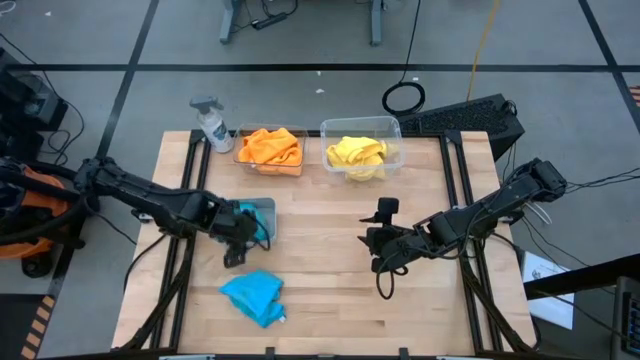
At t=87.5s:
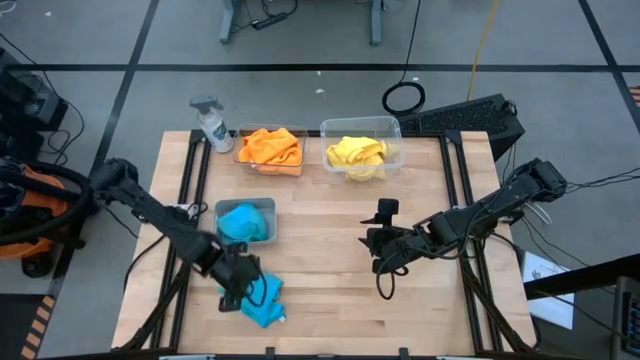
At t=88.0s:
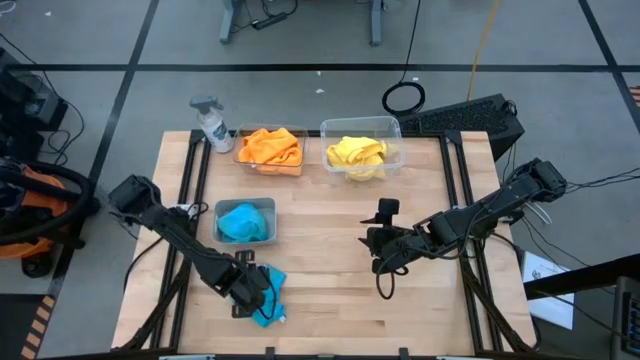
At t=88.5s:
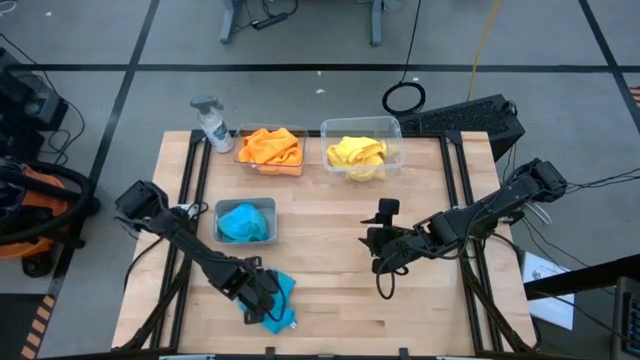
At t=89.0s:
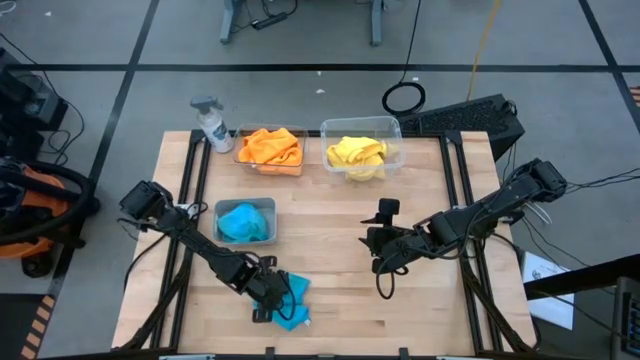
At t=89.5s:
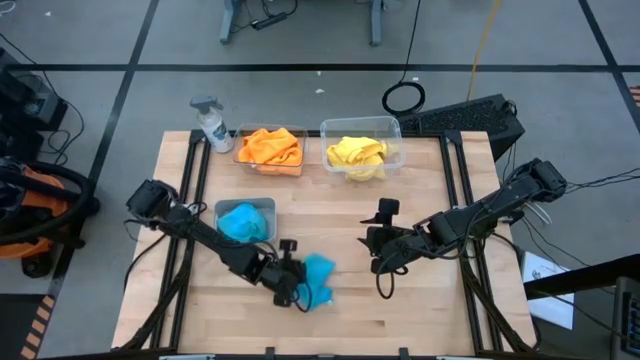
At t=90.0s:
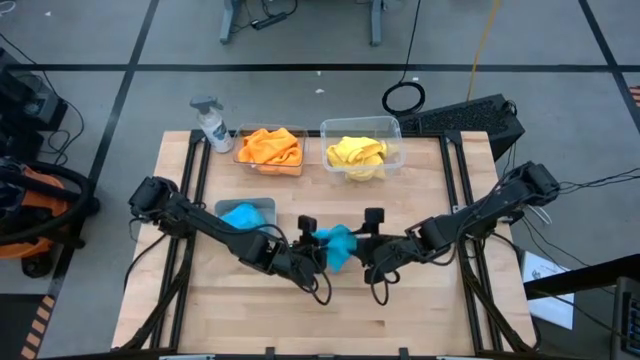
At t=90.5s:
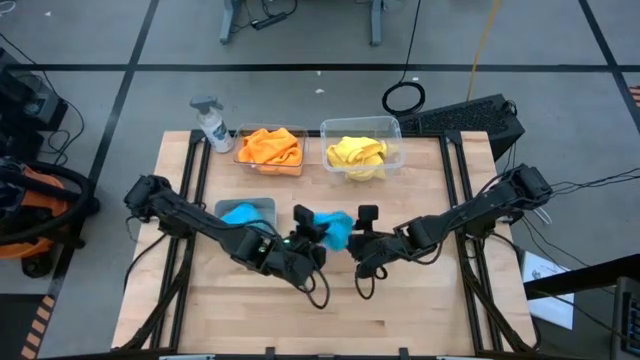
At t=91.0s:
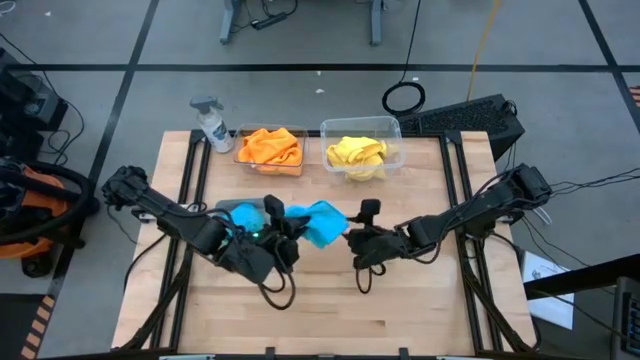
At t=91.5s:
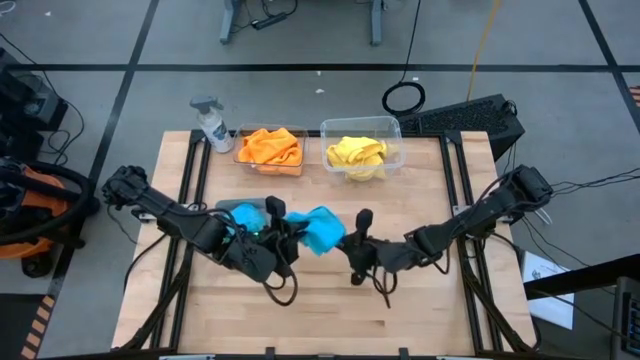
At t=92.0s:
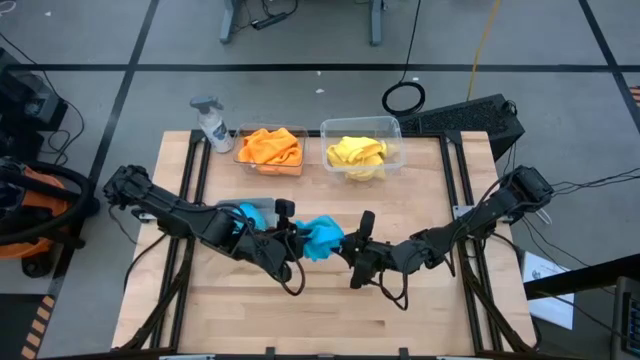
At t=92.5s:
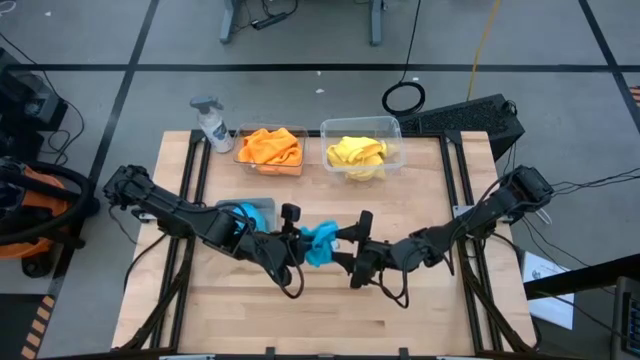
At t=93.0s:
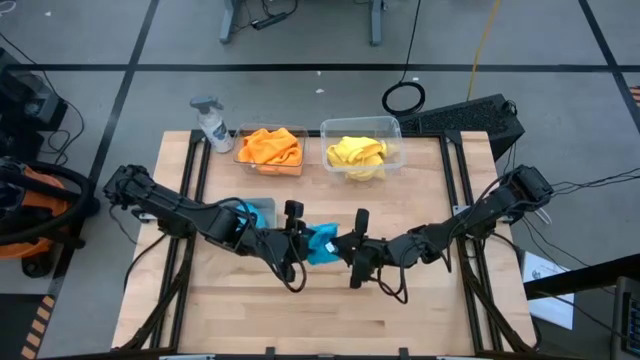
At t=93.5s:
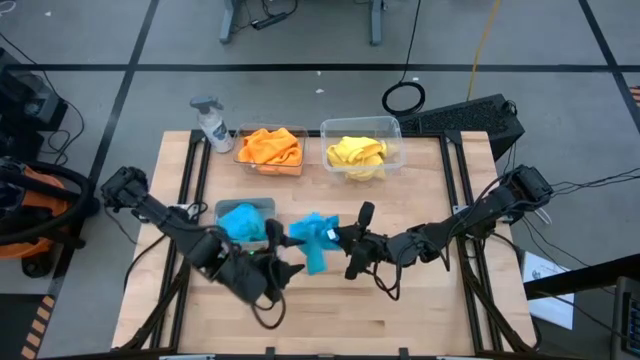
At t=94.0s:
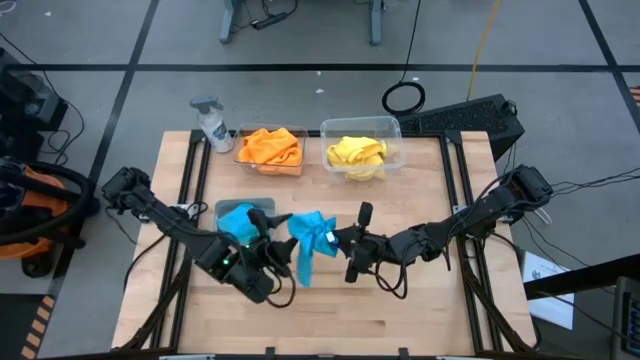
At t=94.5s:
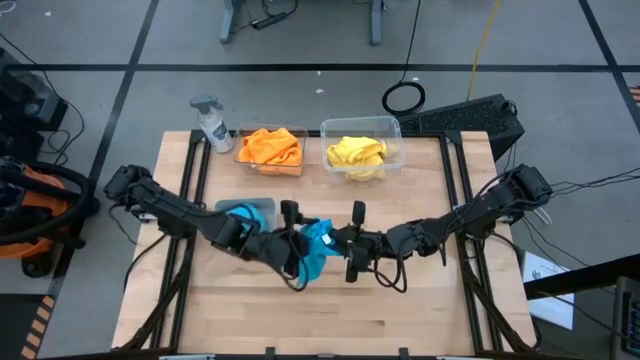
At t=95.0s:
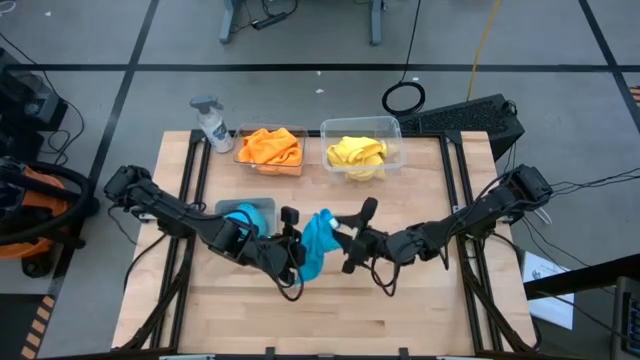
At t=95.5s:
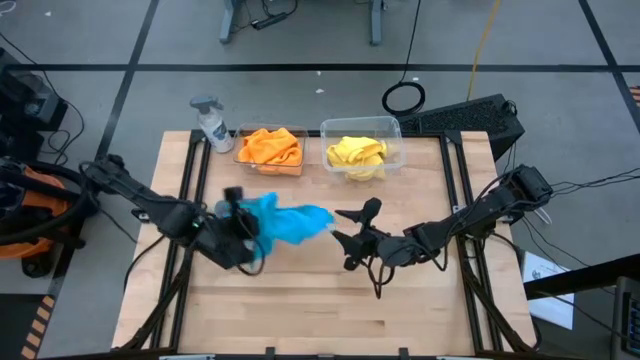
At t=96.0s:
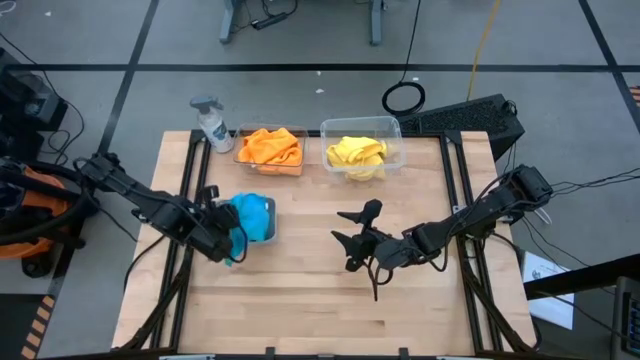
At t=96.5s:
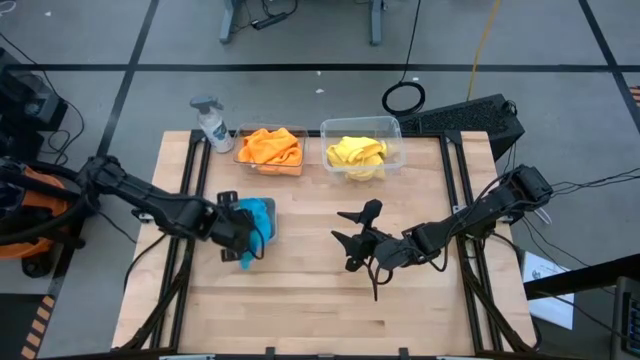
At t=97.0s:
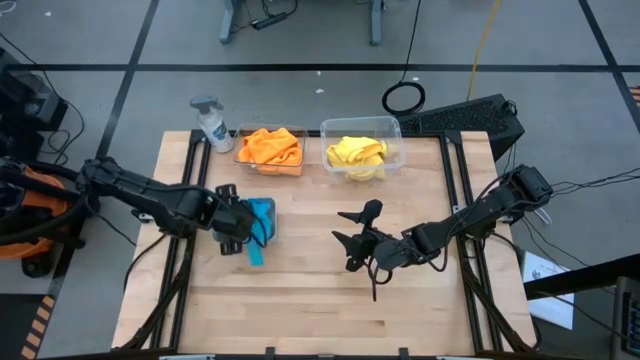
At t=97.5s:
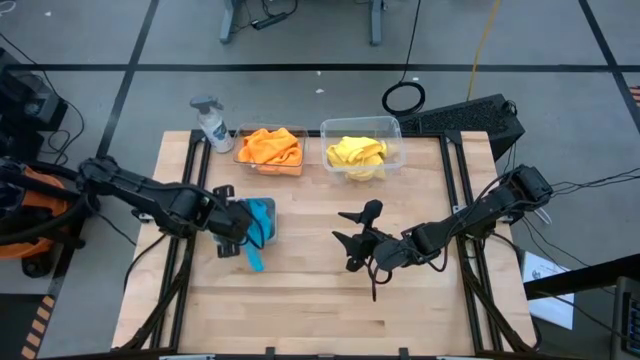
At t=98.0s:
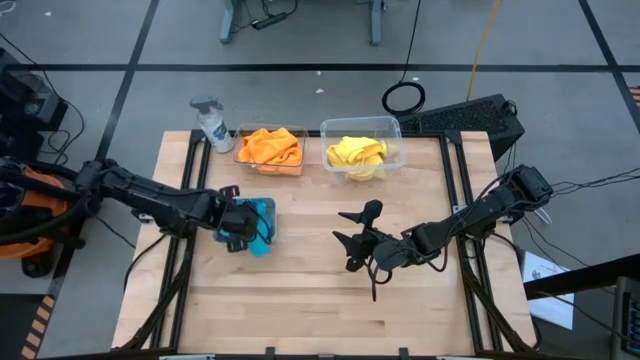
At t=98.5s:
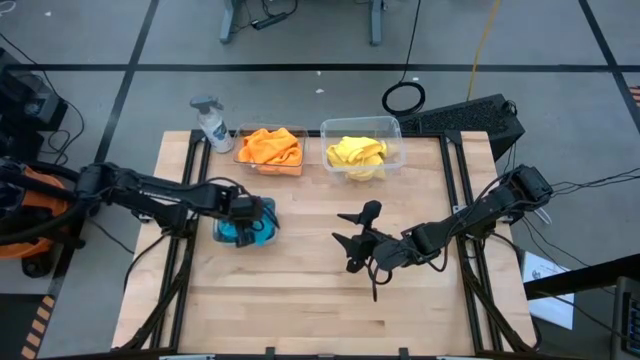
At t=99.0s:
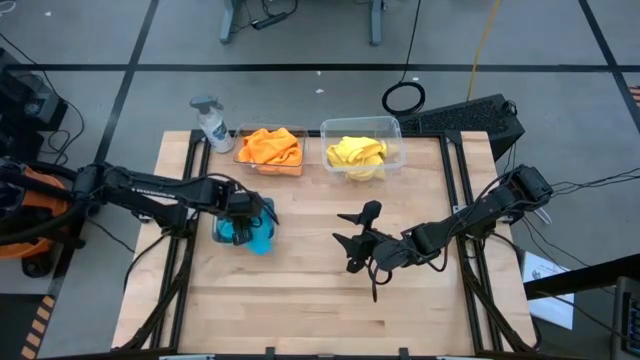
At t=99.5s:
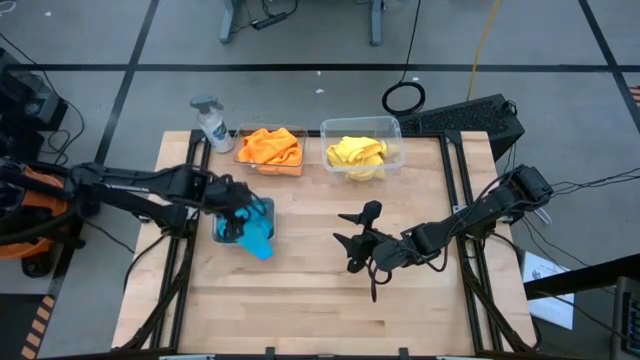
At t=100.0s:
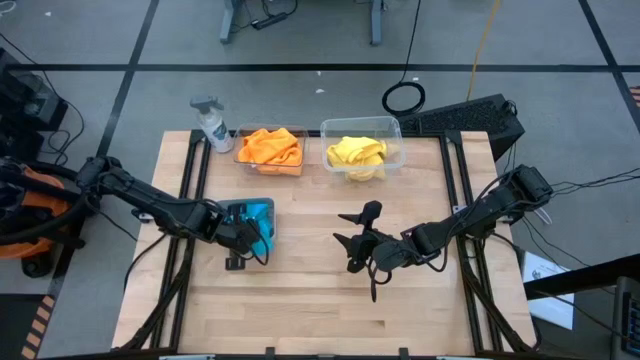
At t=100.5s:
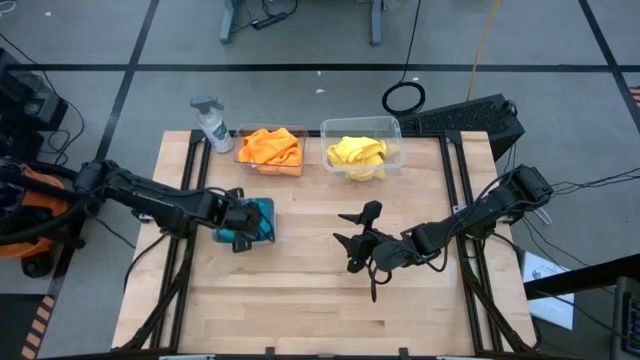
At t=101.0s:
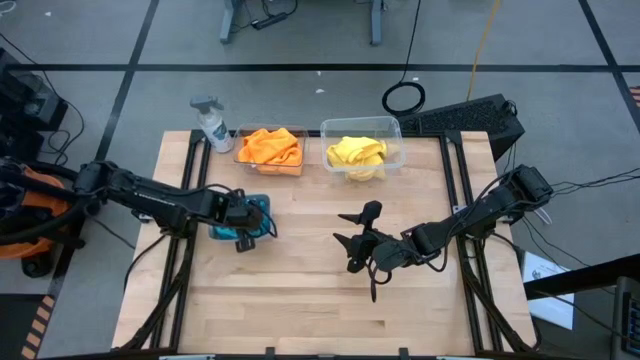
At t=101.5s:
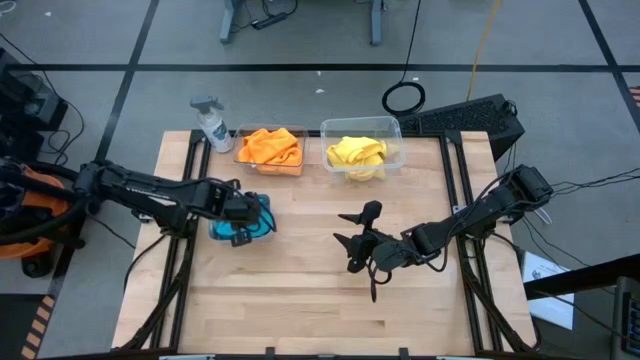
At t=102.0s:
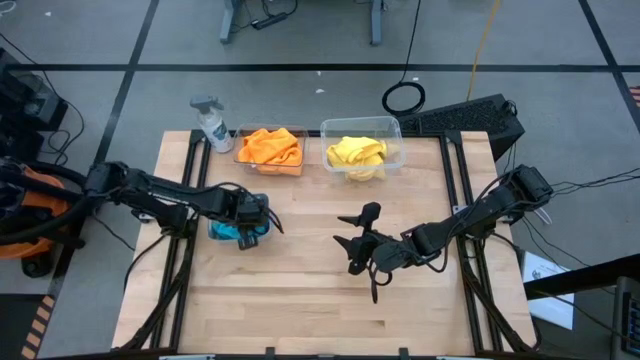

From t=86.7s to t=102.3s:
Task: Sort microfiber towel by color & place in baskets
Put the left blue towel into the gray bin

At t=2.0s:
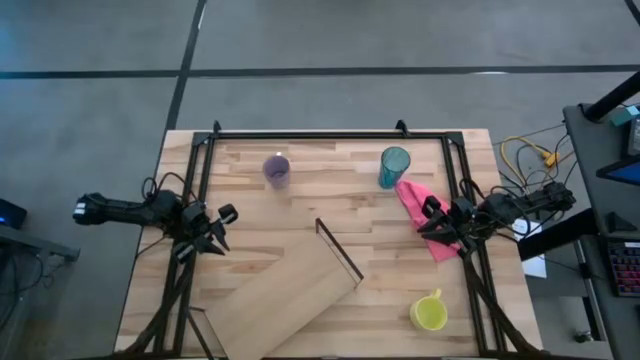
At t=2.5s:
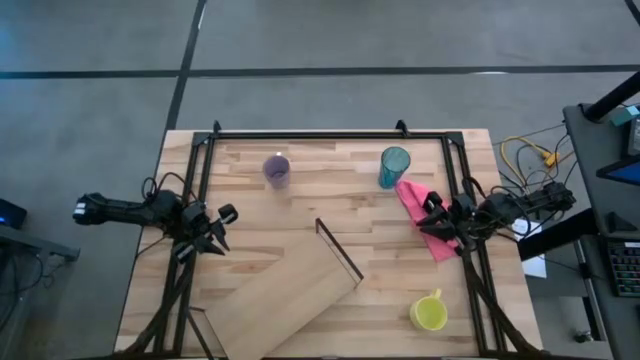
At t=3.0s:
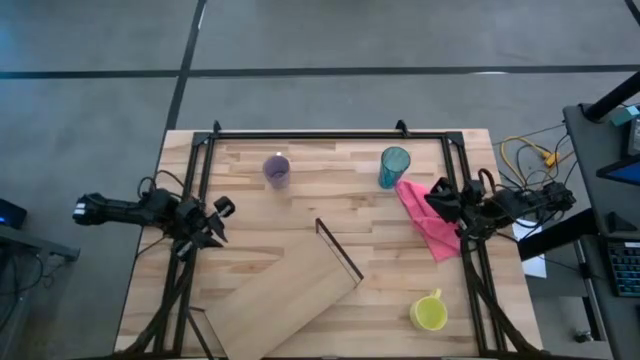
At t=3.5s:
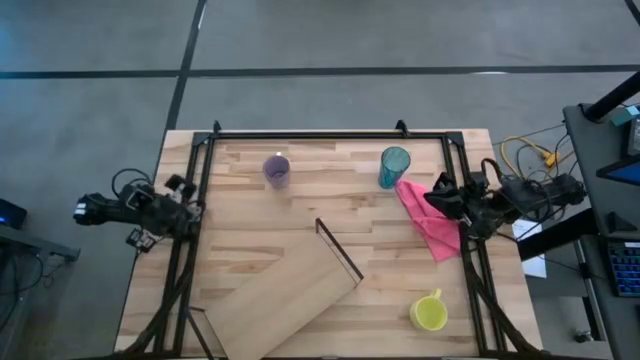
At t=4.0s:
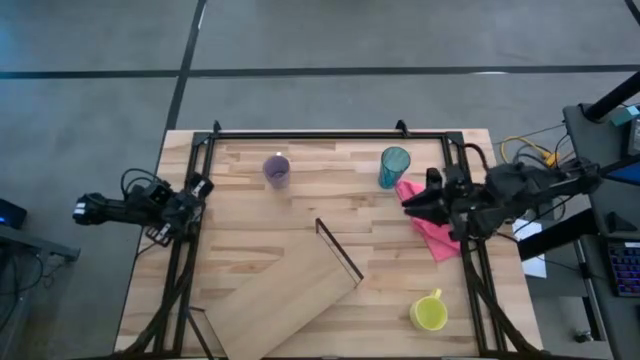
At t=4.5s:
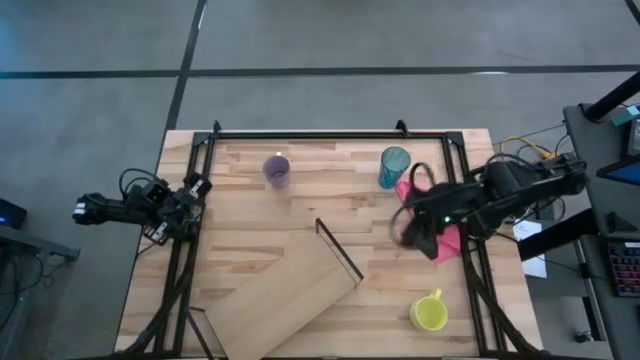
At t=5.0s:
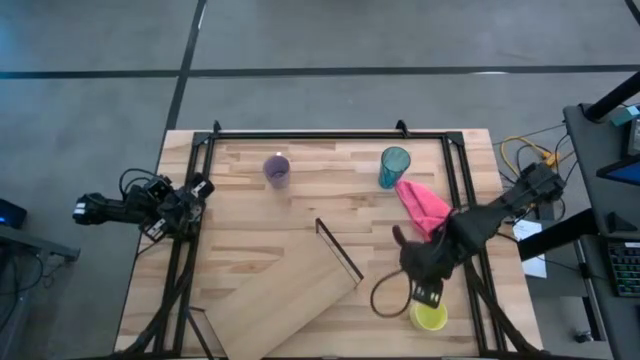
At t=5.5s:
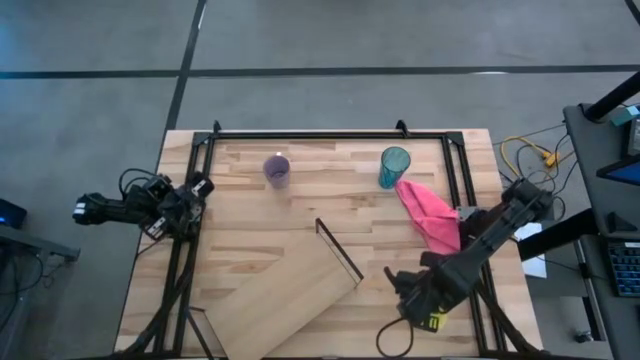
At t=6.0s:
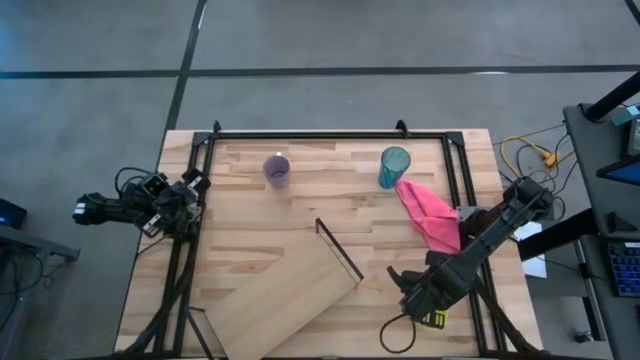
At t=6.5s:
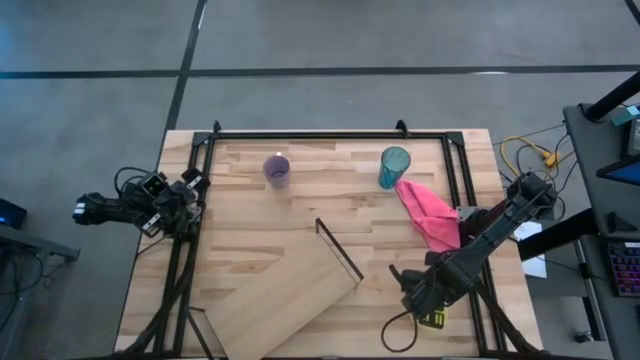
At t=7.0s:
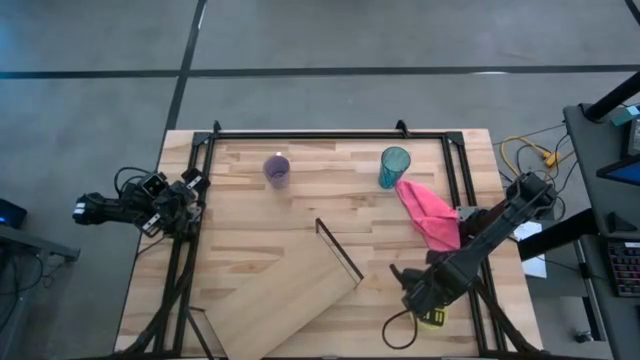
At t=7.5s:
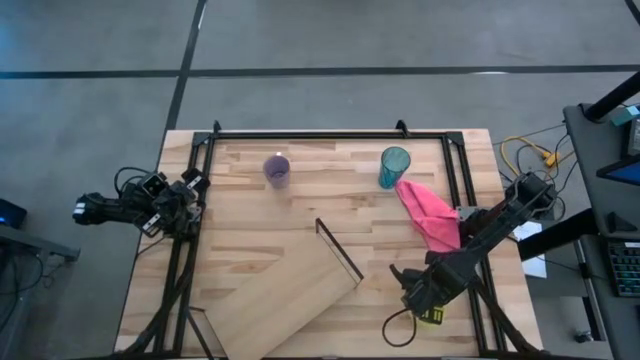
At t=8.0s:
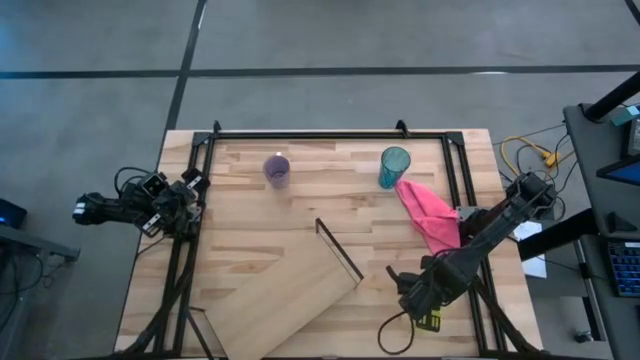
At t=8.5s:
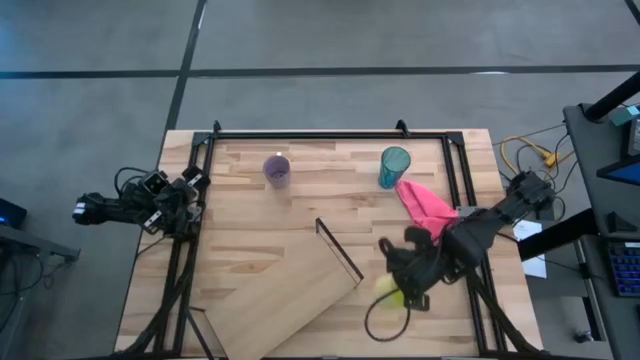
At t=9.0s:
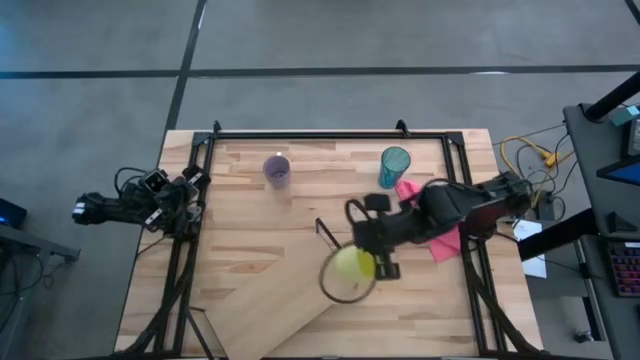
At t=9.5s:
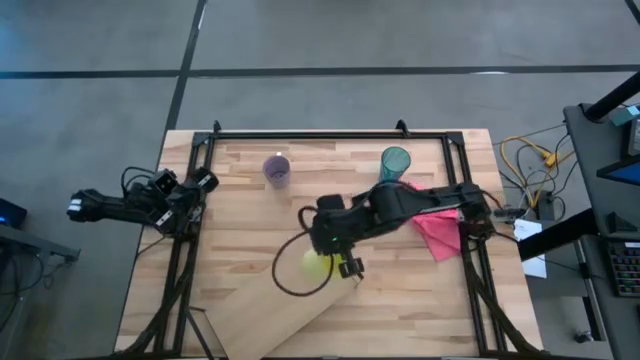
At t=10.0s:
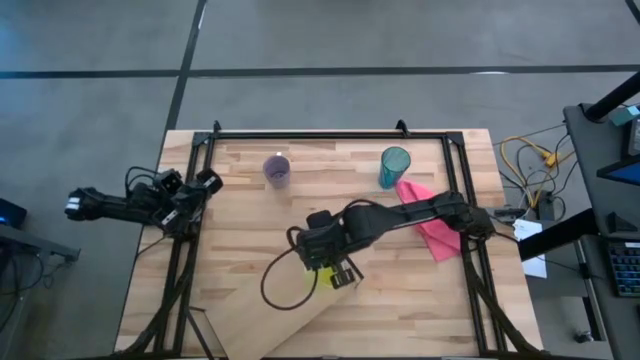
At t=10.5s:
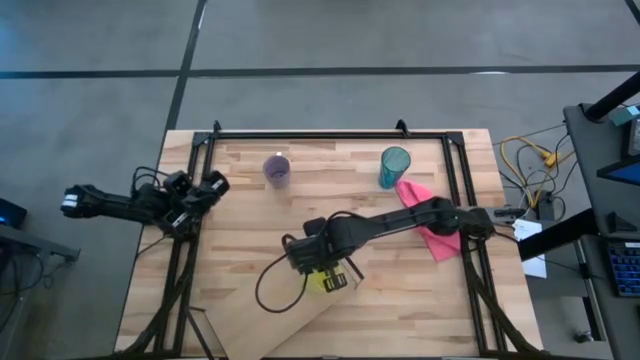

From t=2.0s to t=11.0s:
Task: Stack small to large cups/mugs on shelf
Put the yellow mug on the shelf
